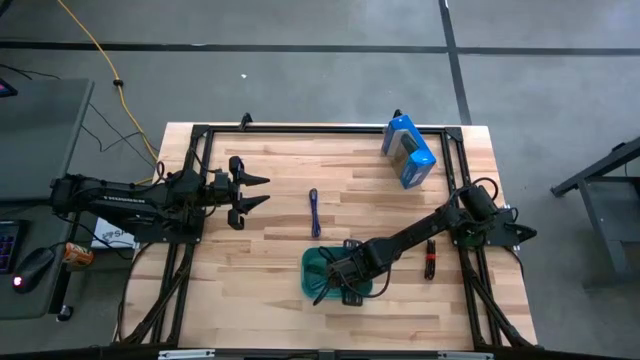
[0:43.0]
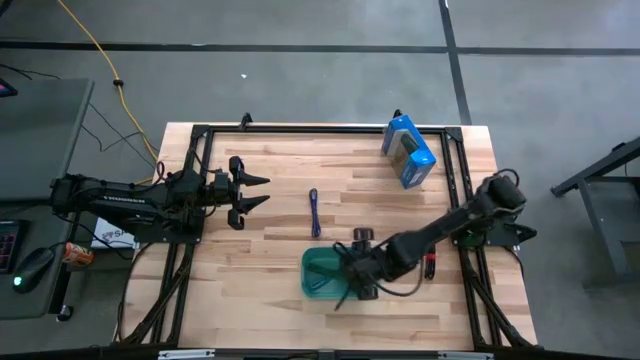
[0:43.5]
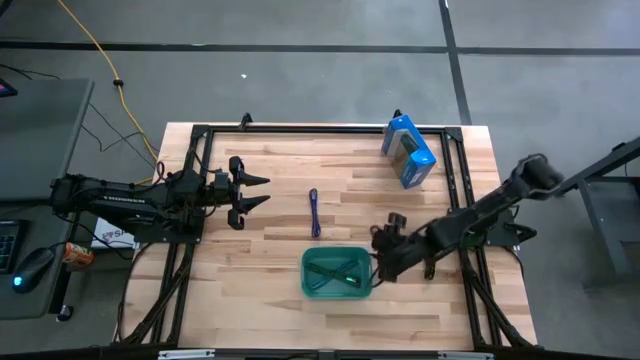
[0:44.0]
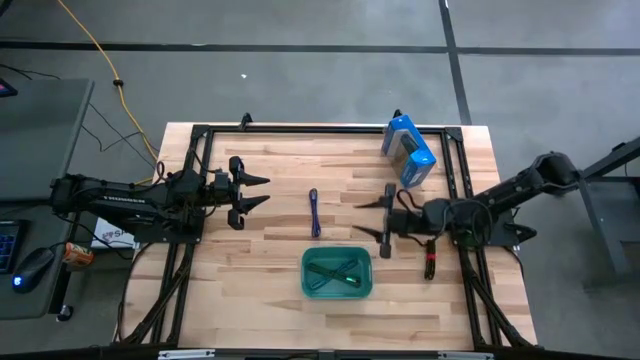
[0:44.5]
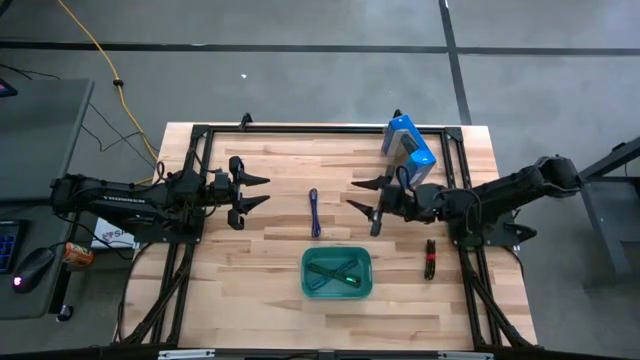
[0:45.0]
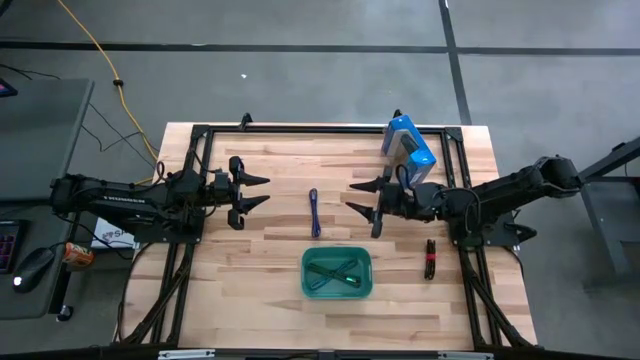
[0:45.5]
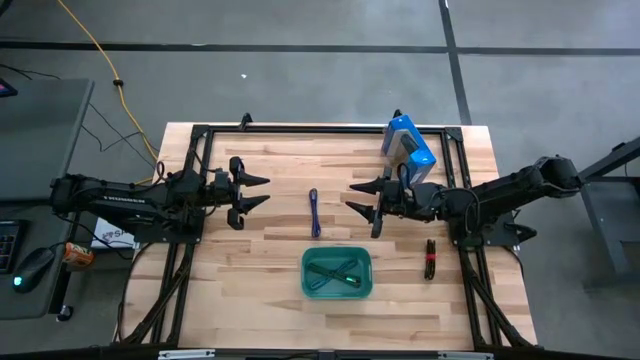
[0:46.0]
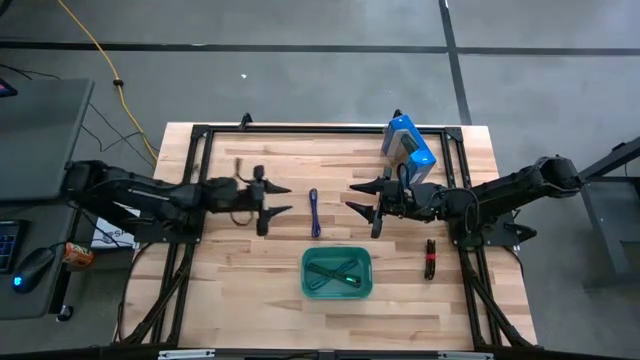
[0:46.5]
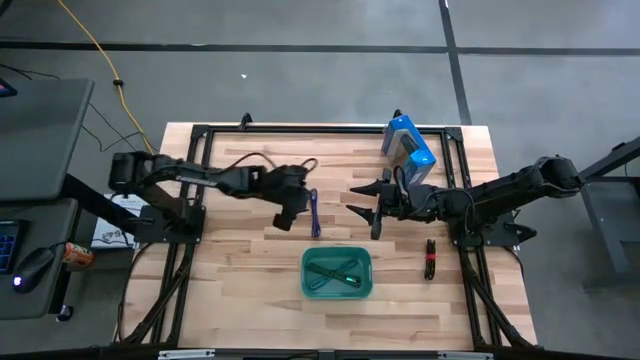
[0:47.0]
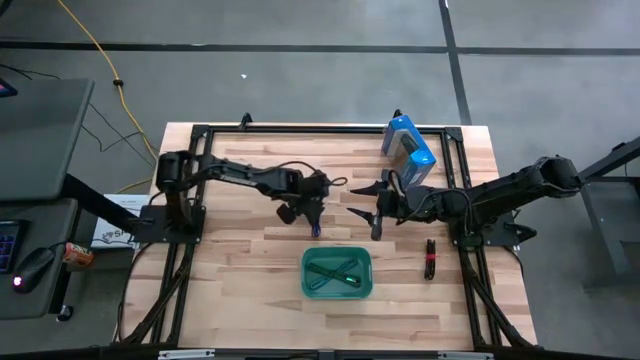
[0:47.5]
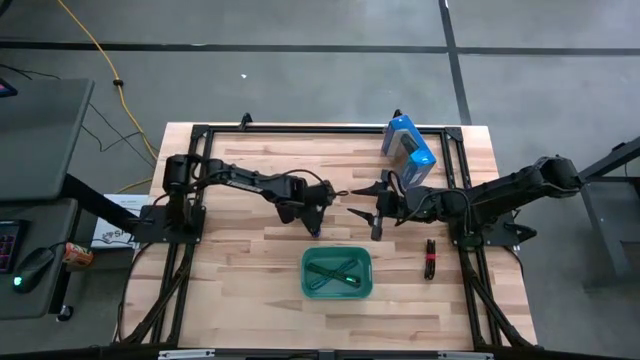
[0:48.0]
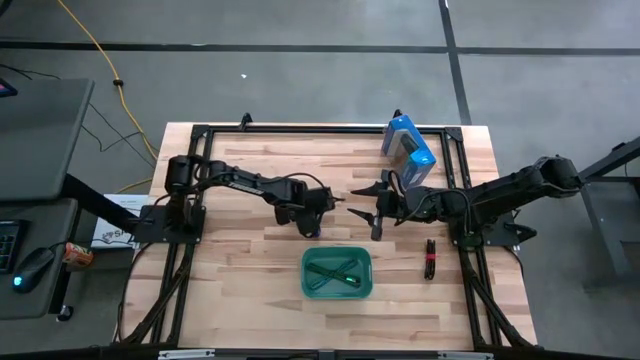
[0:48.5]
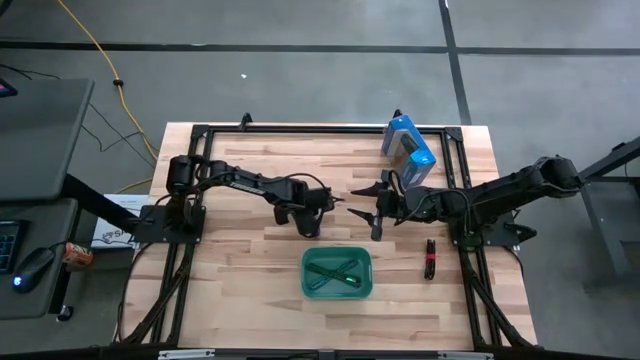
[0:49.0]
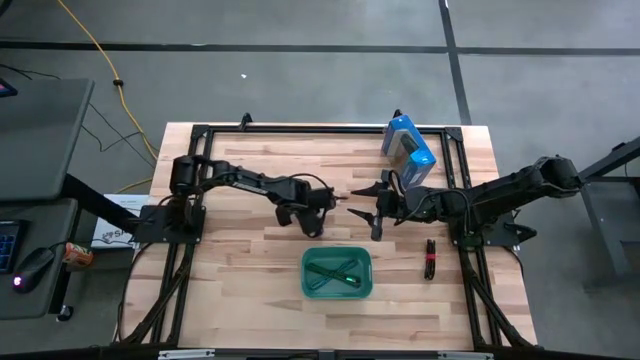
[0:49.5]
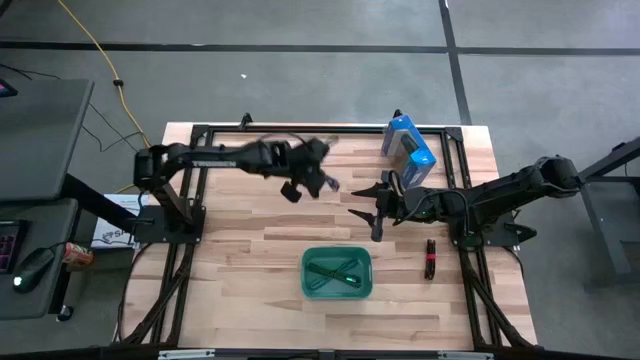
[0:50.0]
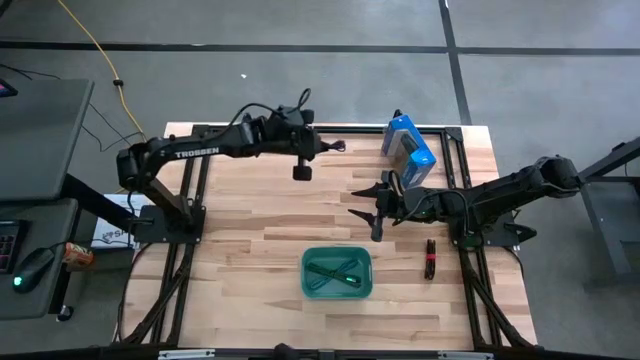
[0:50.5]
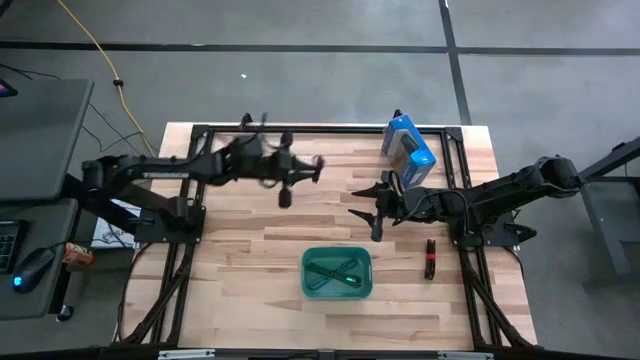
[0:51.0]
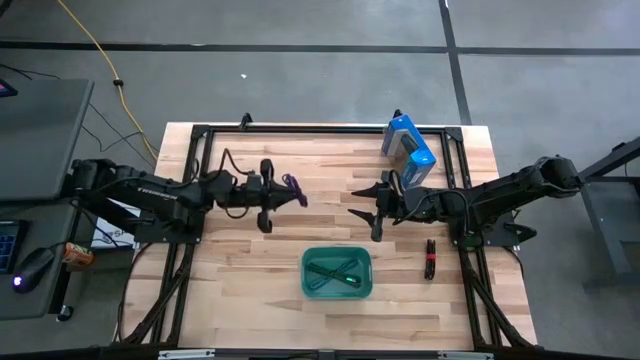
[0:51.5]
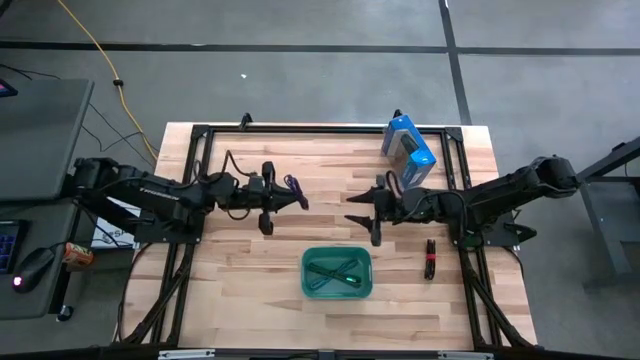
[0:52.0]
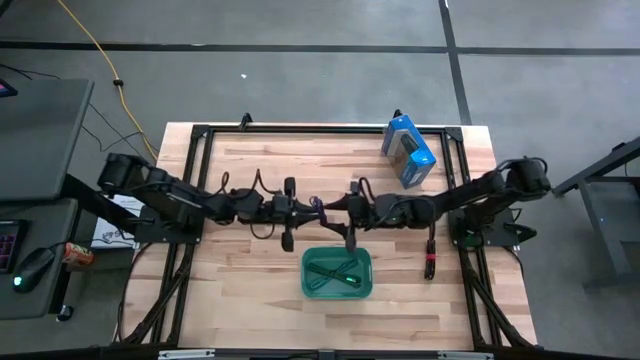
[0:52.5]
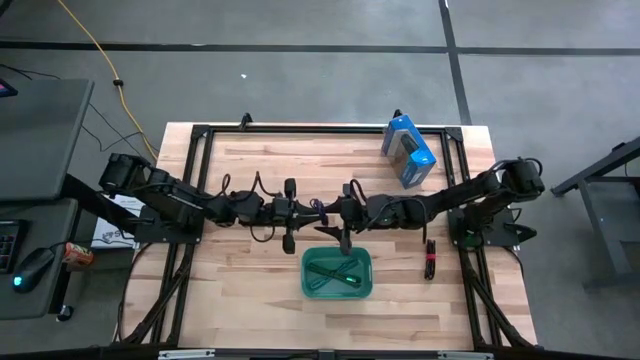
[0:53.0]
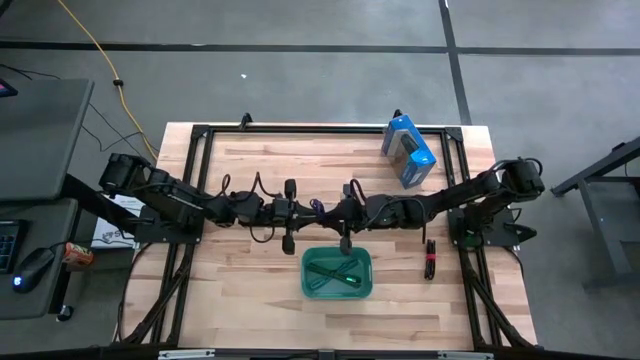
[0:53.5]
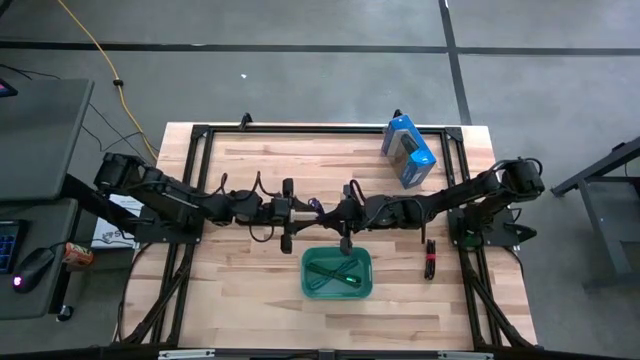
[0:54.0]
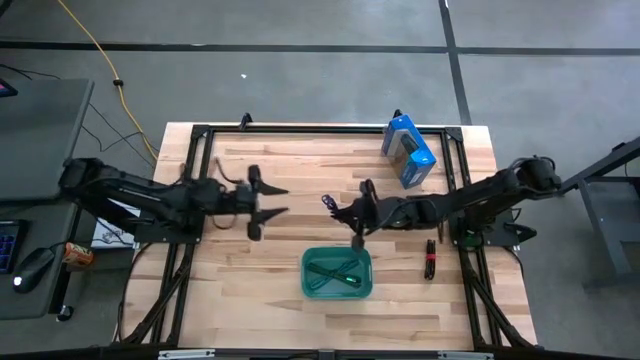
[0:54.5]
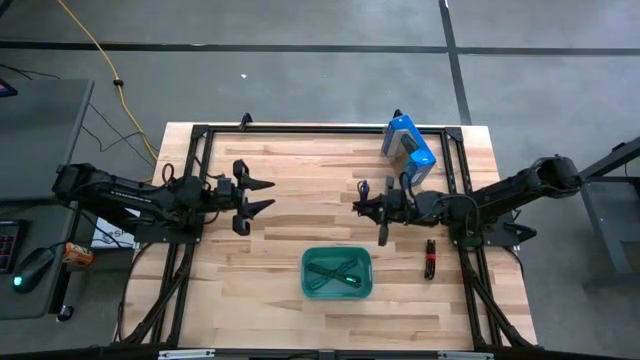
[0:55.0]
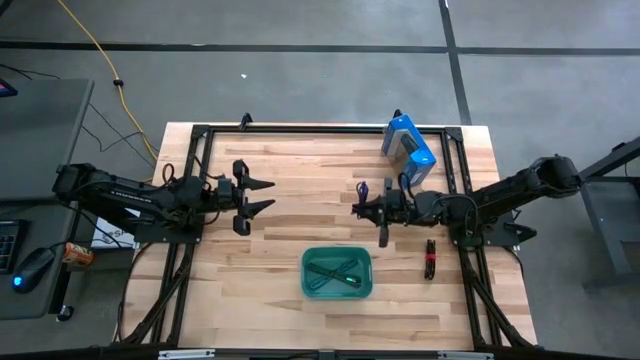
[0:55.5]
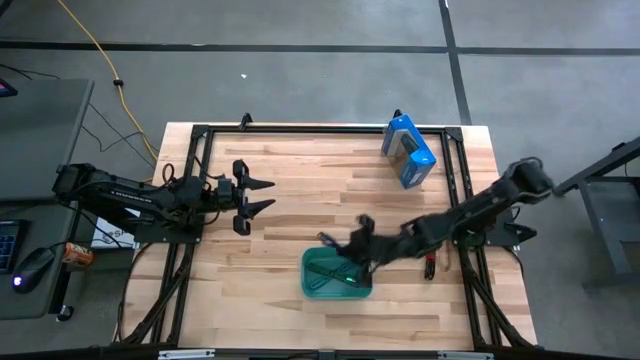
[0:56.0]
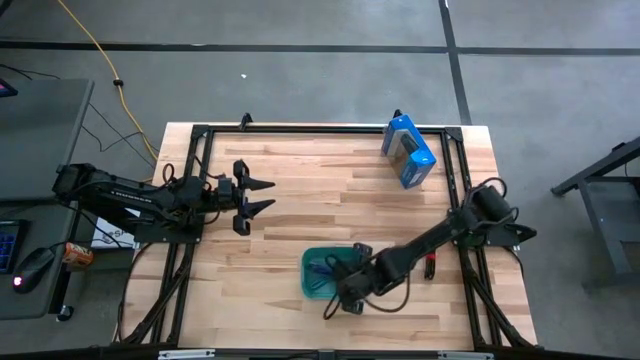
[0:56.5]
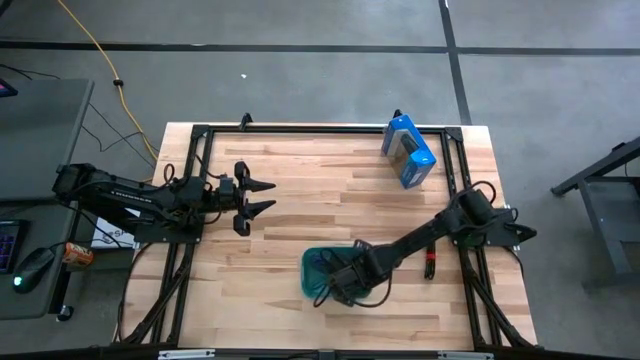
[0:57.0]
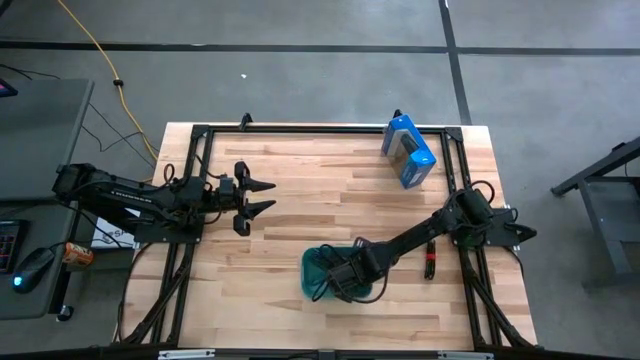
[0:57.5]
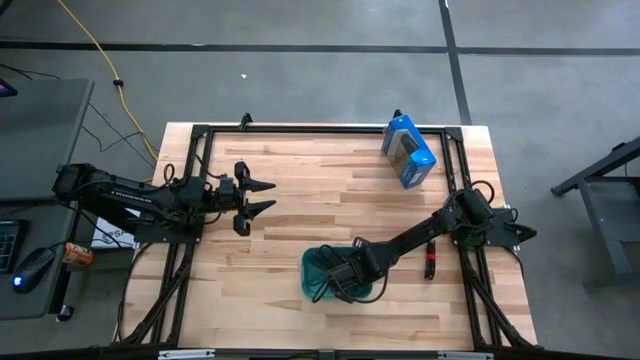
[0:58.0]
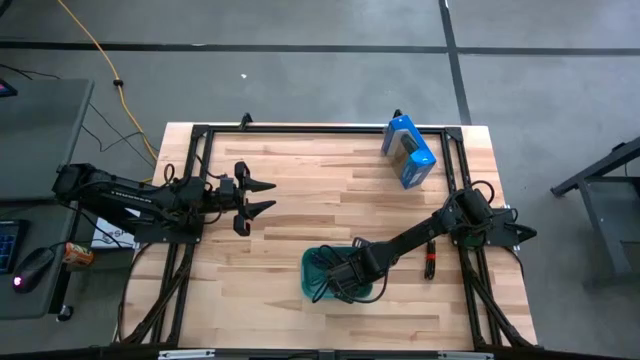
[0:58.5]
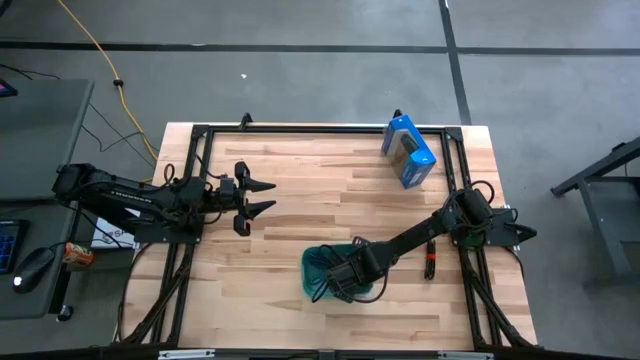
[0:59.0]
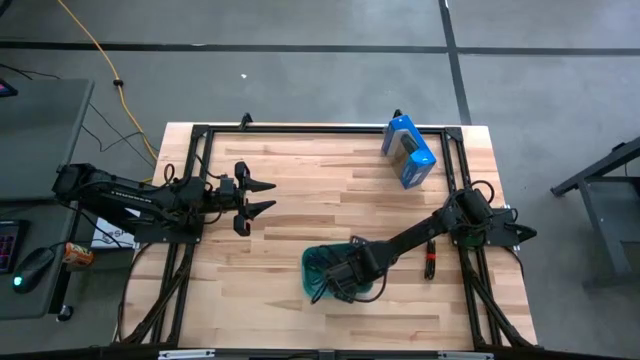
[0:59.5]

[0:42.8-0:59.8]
Task: Pick and place USB-C Cables
Put the black violet charger cable into the green bin
